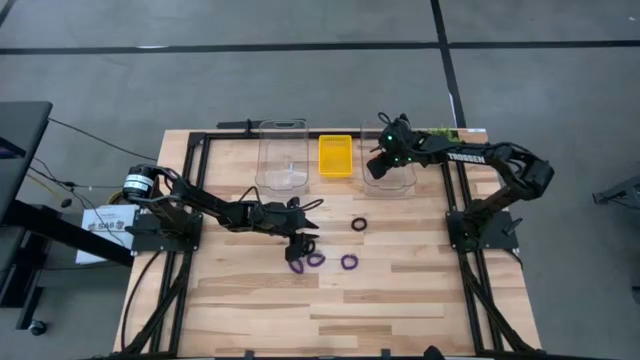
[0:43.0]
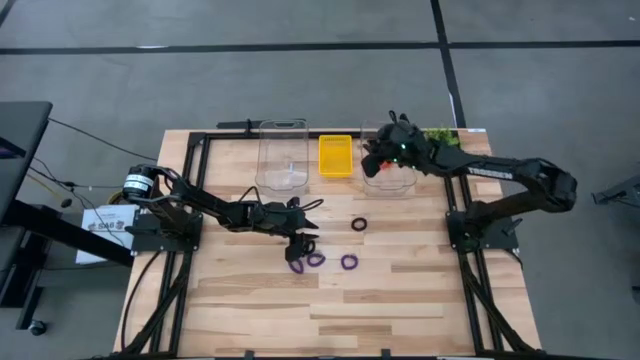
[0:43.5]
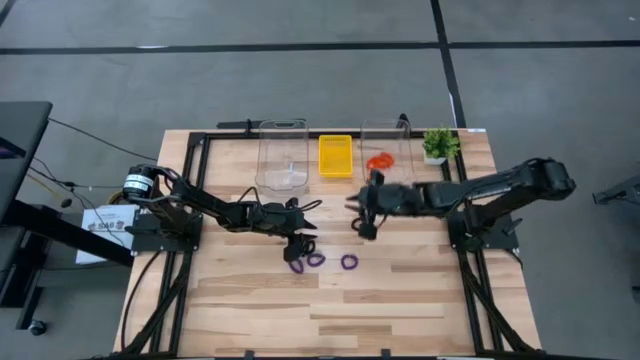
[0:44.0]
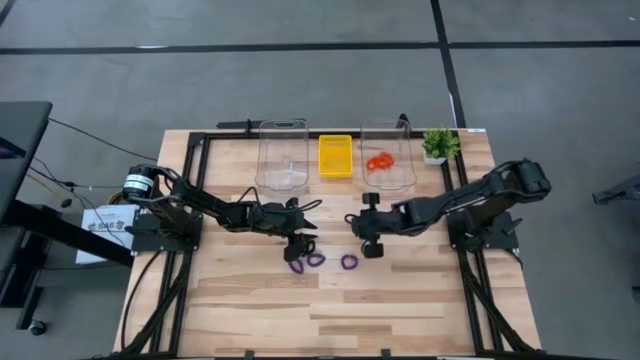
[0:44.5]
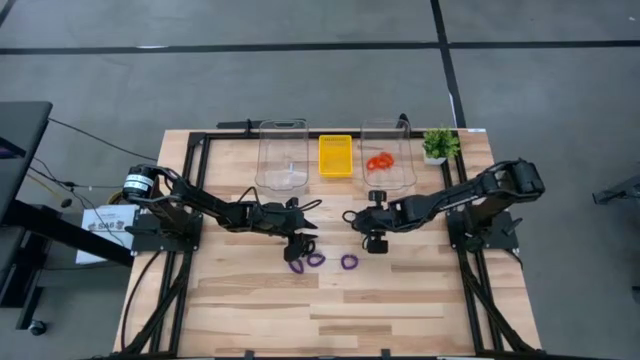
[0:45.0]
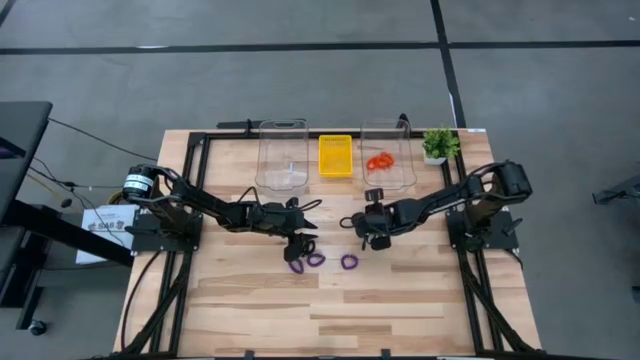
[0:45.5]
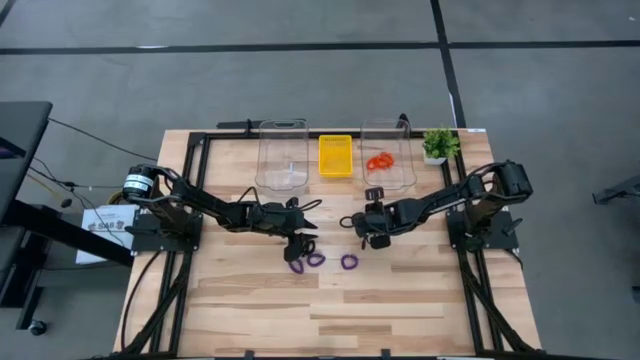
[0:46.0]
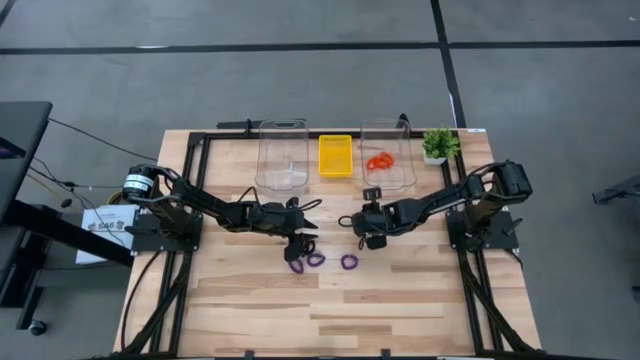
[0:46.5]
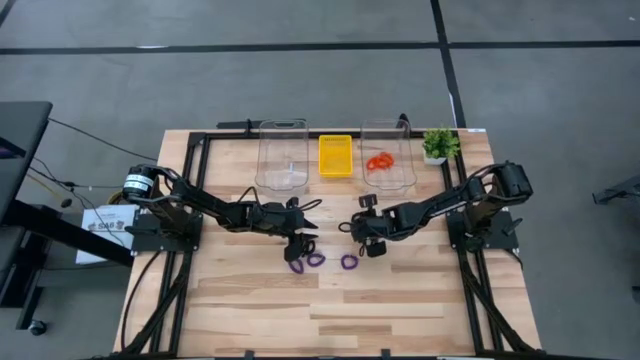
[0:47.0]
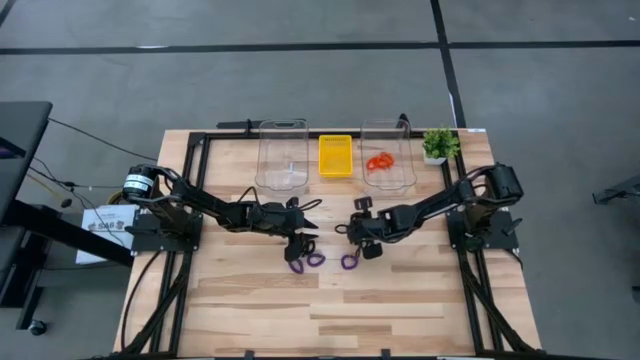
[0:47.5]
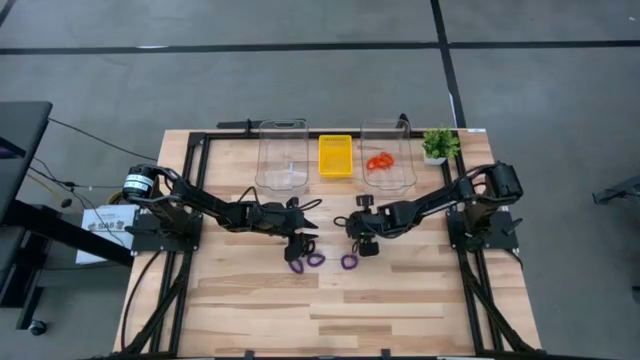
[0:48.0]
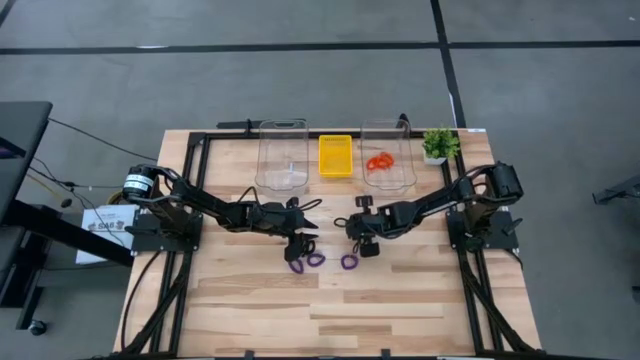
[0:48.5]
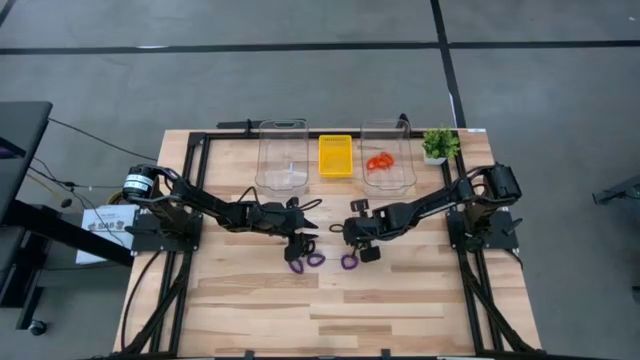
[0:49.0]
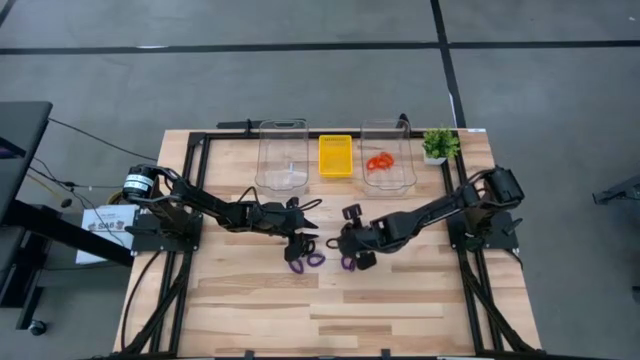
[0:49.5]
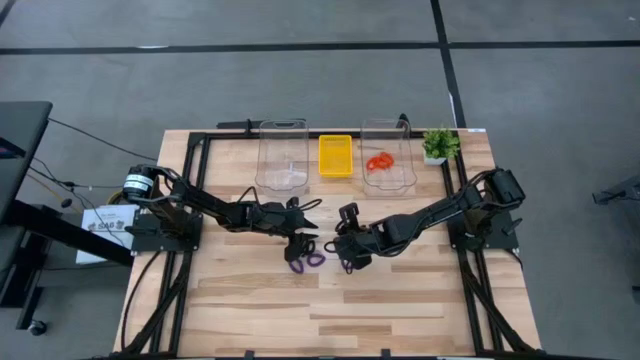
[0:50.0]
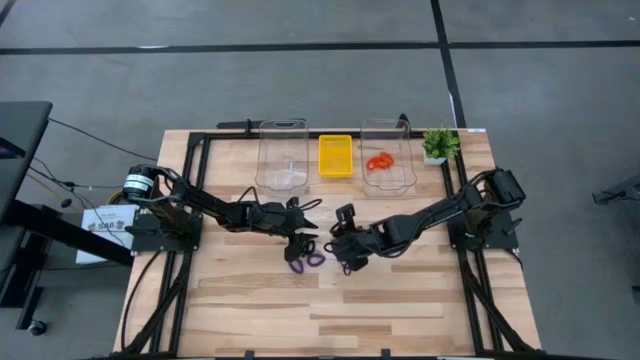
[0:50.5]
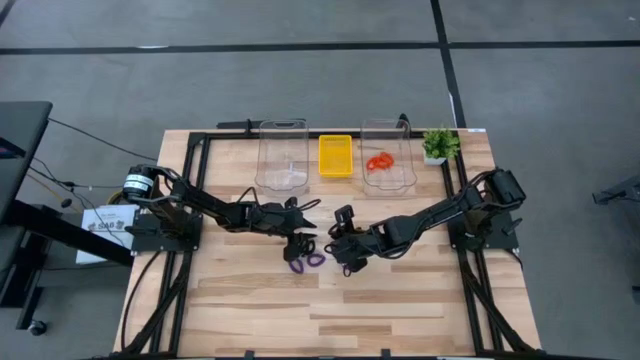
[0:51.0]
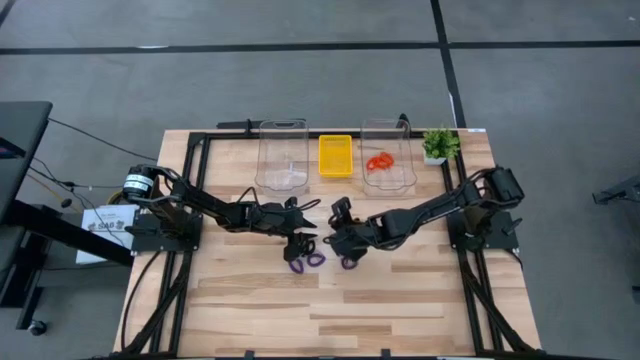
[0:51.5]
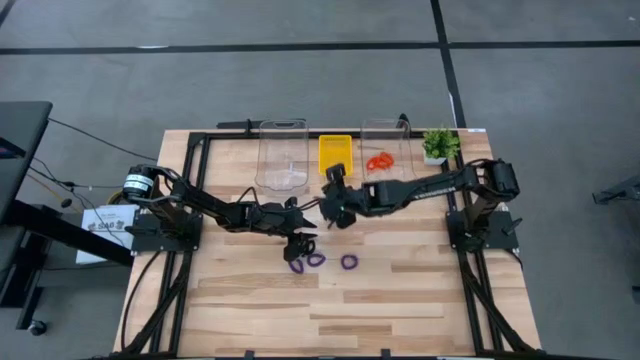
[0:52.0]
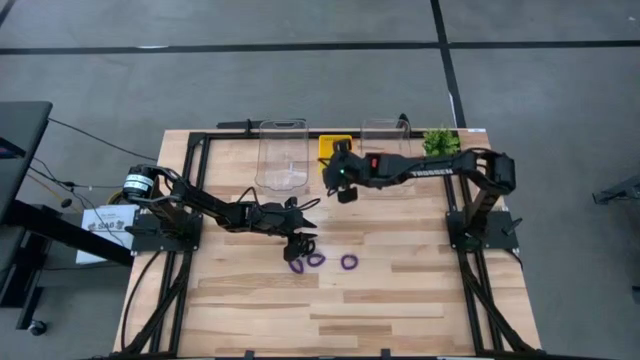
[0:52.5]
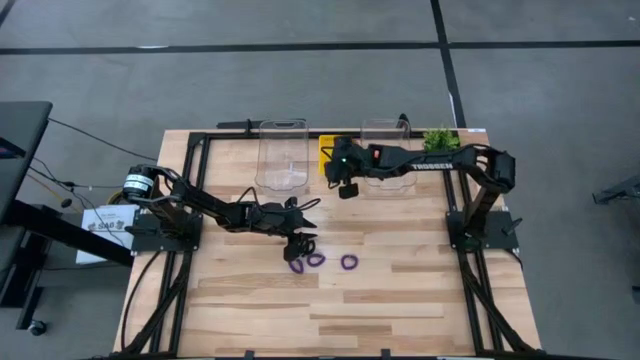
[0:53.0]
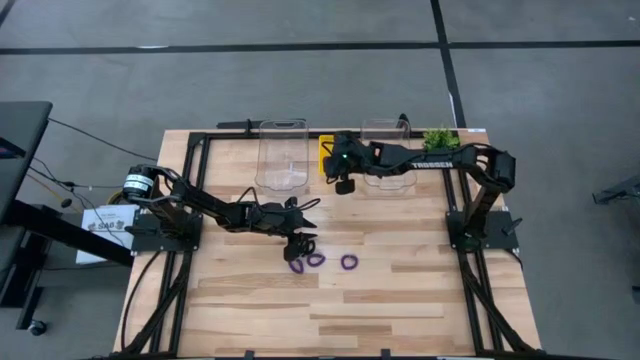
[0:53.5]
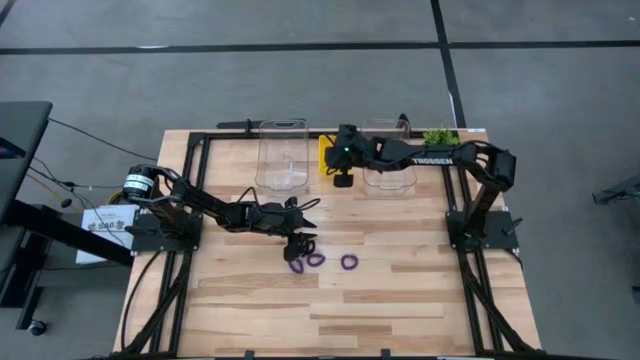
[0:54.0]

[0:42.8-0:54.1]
Task: Sort spring keychains
Put the top black spring keychain into the yellow bin
